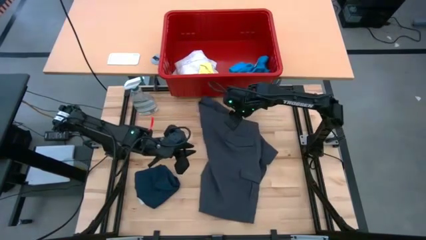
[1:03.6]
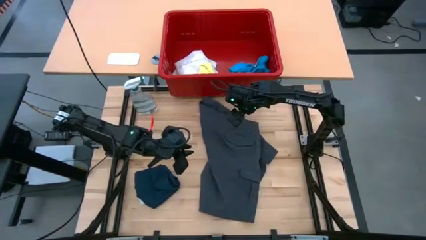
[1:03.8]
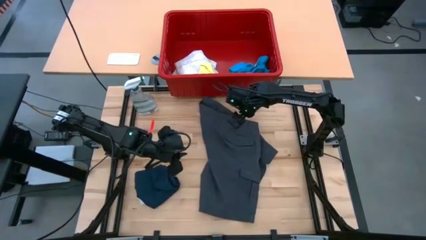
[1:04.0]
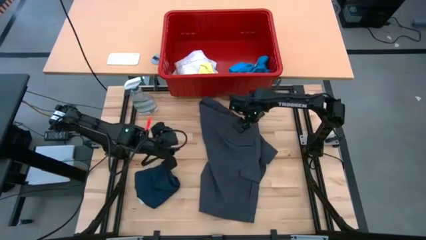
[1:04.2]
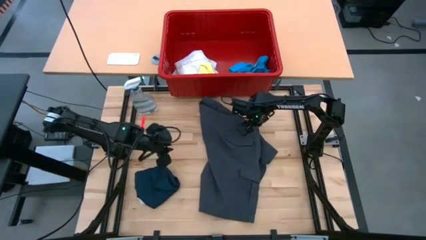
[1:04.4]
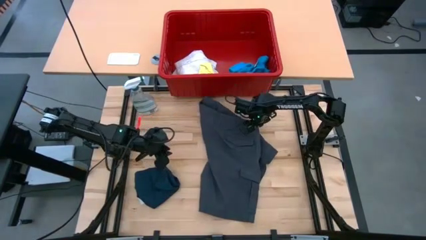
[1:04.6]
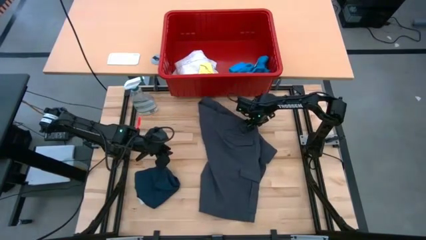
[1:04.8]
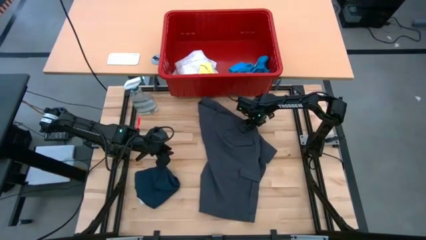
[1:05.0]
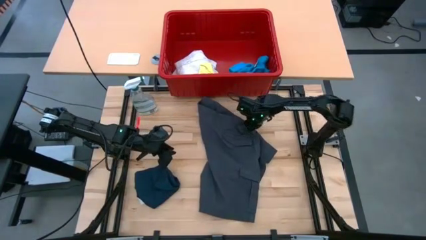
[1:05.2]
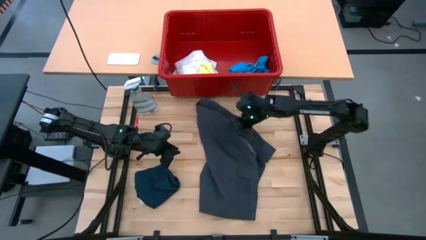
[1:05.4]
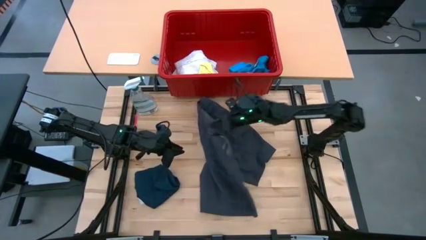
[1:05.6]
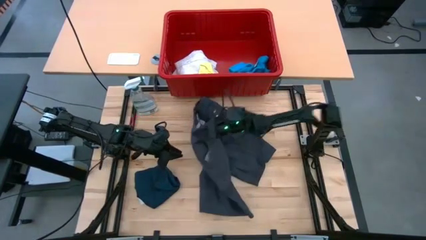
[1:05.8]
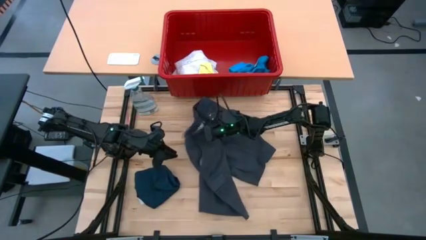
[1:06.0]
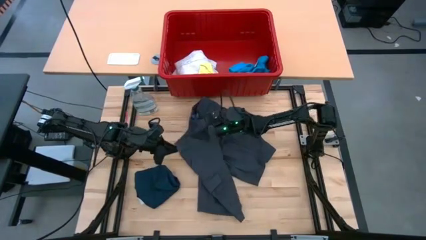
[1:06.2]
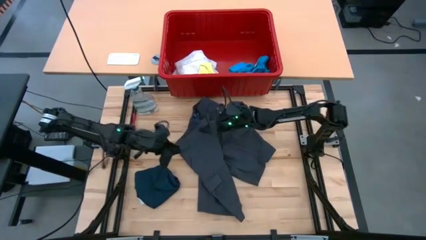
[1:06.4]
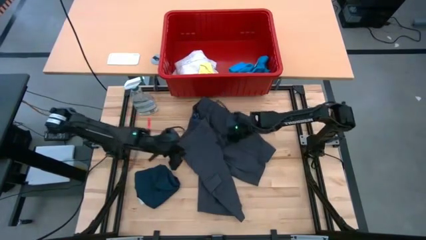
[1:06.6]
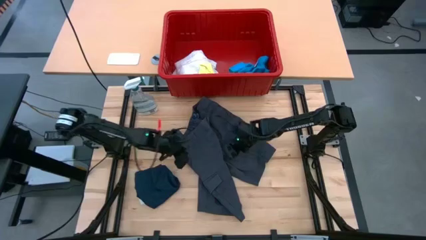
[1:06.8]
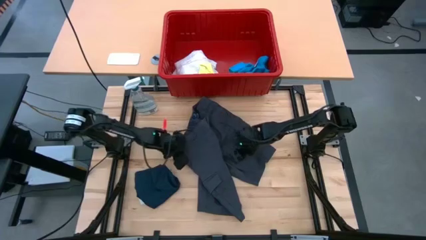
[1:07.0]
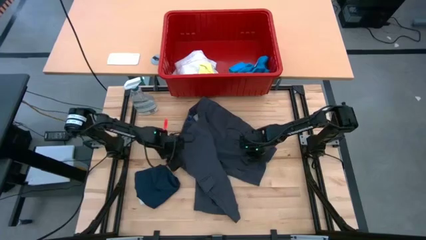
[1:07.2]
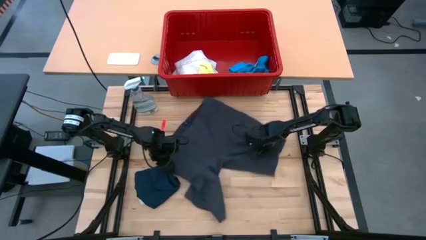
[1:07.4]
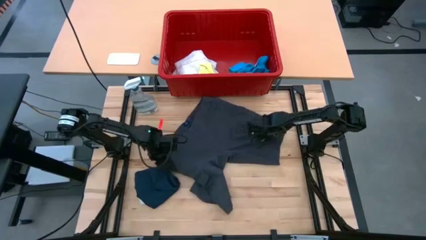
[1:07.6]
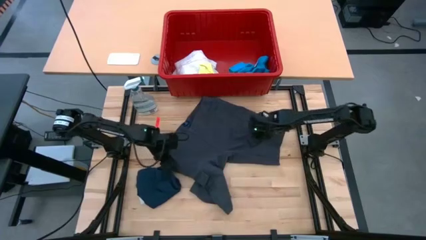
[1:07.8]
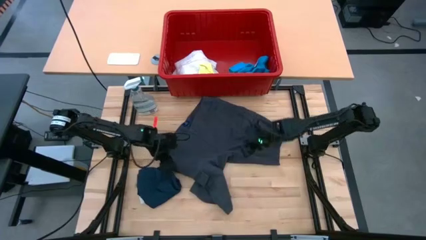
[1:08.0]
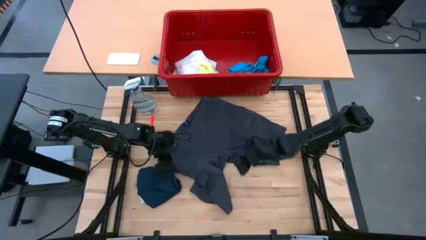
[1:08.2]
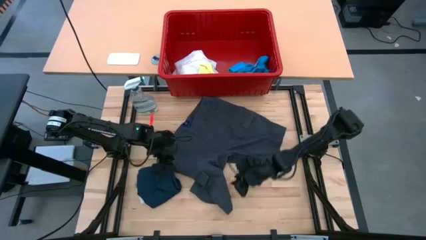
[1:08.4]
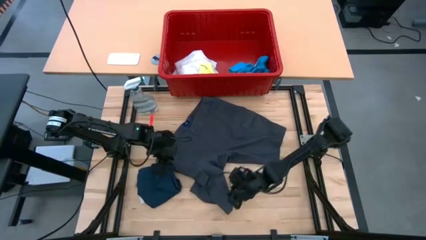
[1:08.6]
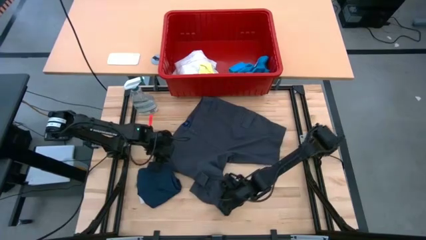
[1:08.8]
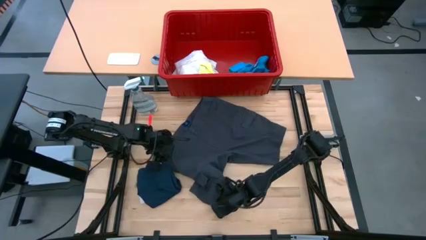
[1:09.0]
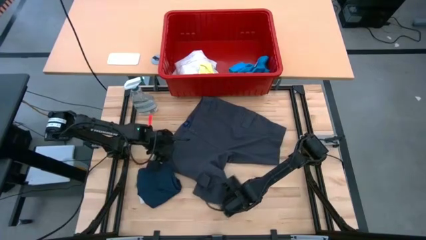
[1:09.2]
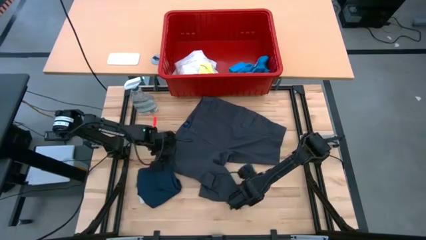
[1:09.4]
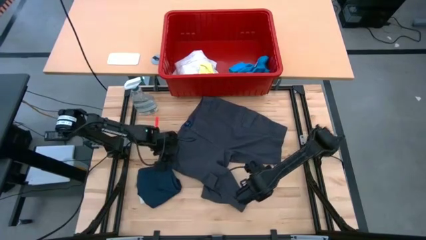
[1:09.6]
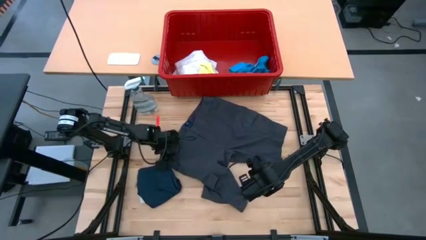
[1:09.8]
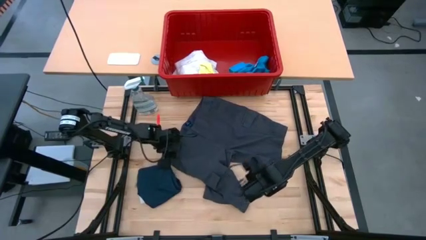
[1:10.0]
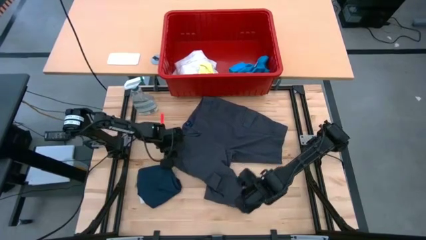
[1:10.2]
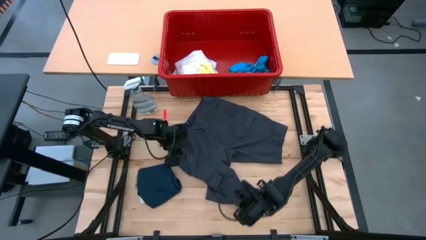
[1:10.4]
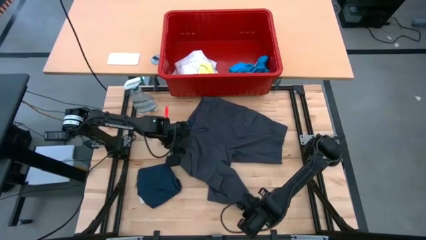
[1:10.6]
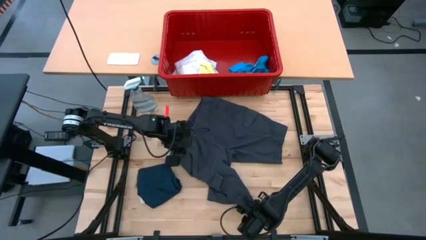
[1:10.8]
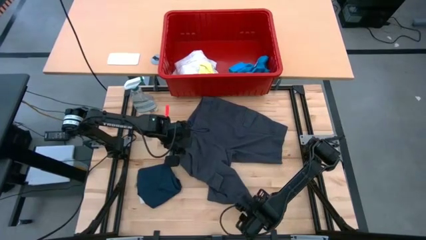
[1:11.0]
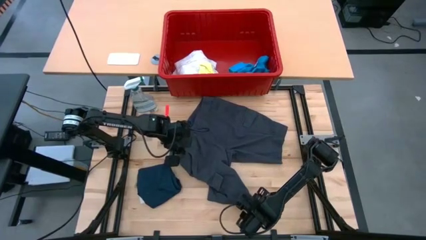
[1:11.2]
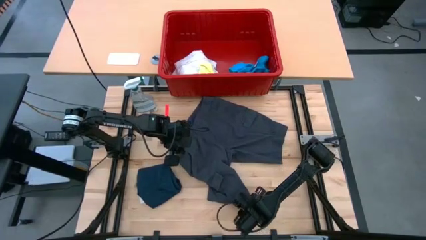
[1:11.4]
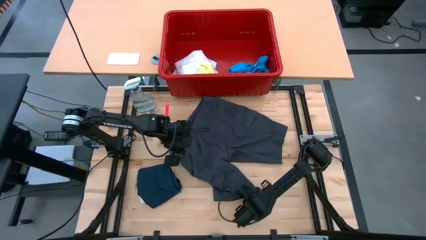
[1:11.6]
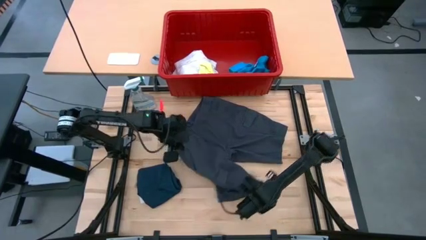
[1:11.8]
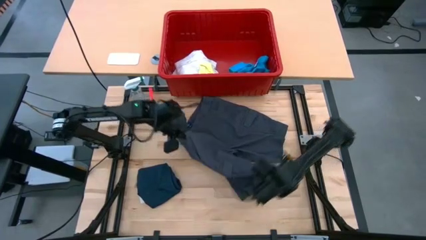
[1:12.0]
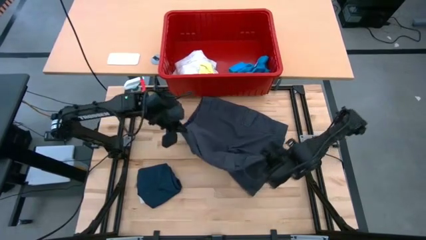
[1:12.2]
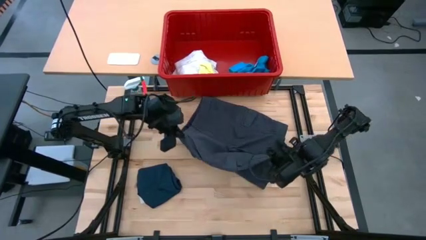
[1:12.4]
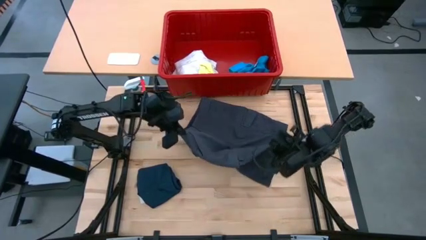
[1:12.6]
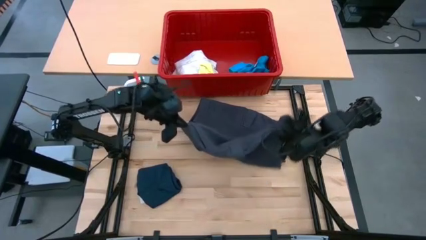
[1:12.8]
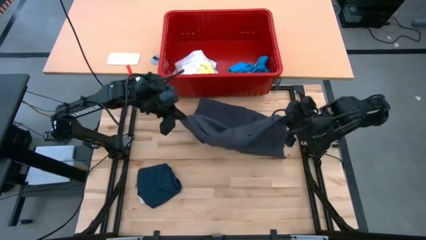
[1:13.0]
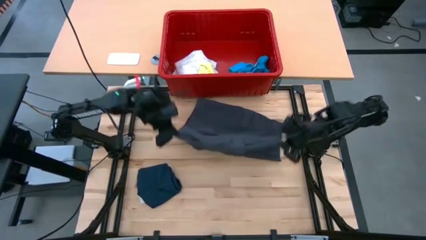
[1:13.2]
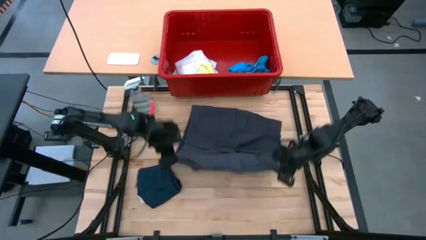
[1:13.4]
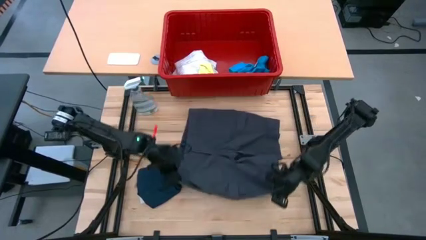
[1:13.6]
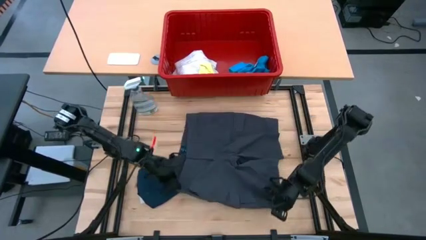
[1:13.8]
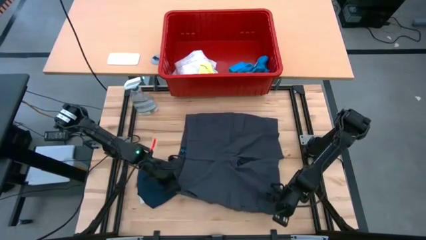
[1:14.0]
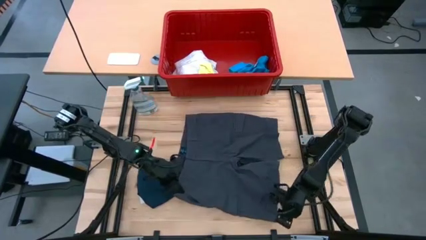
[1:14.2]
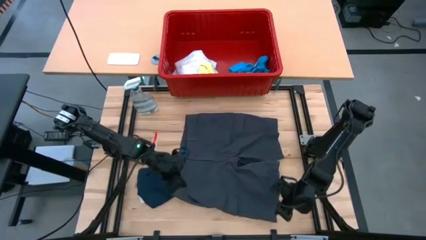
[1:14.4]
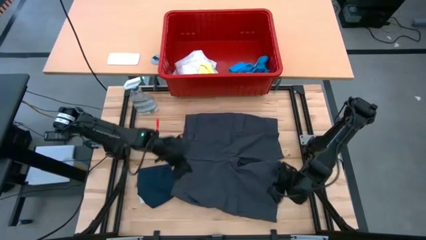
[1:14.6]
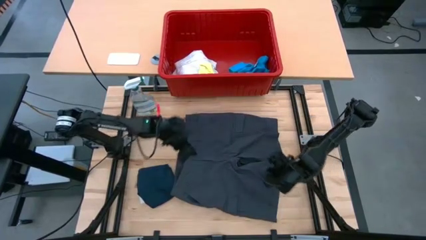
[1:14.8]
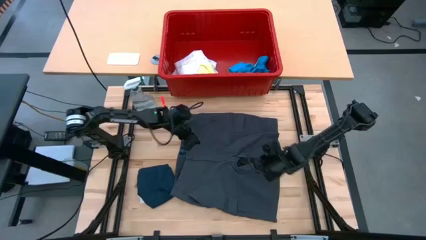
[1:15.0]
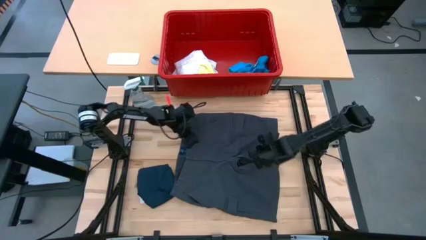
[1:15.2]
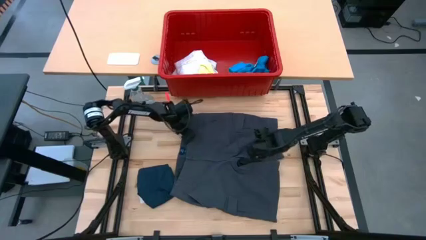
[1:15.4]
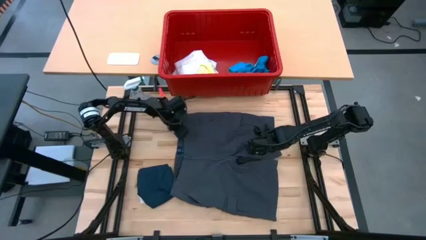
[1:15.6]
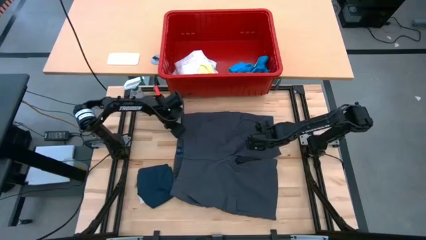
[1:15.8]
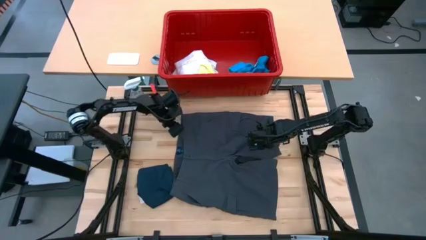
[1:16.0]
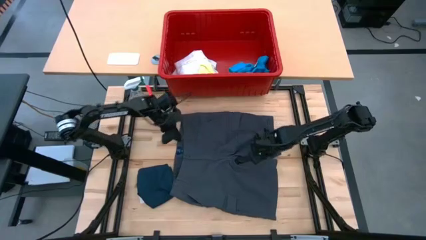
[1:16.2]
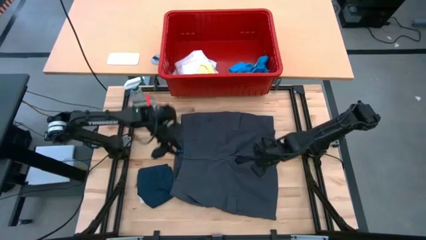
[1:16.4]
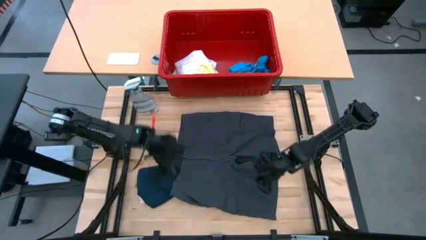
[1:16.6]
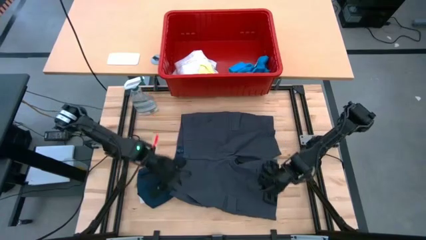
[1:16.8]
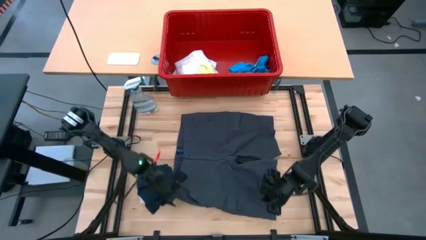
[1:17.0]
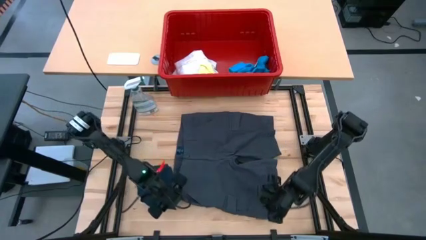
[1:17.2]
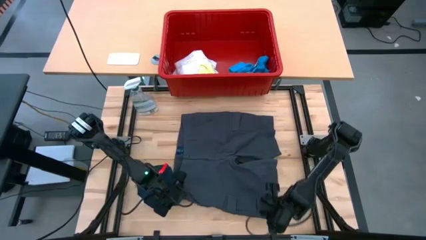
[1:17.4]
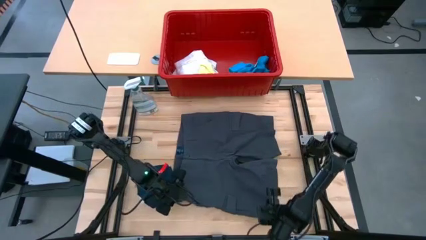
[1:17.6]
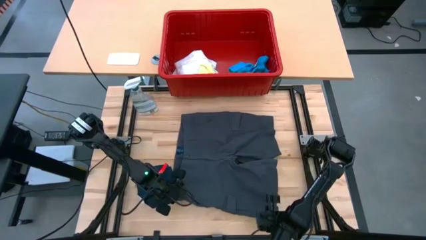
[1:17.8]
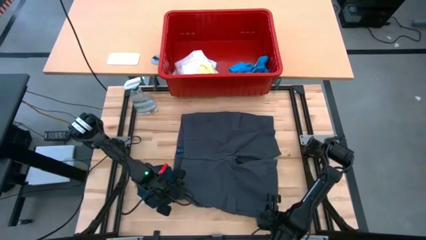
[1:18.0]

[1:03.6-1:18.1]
Task: Fold laundry
Fold the black shorts
